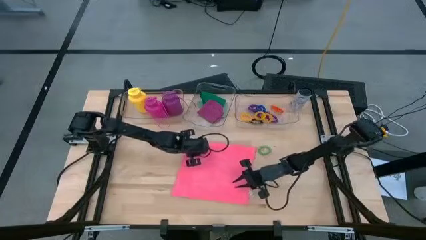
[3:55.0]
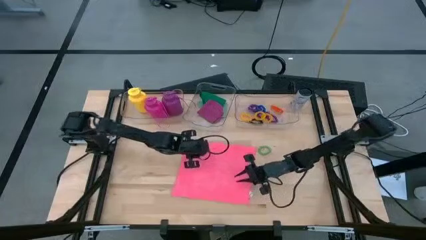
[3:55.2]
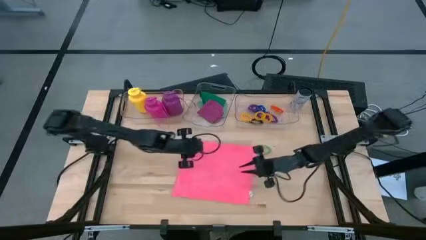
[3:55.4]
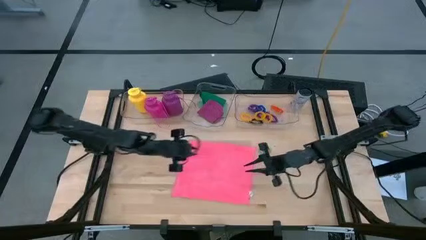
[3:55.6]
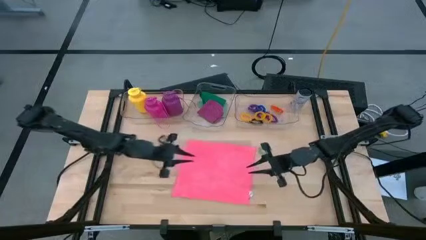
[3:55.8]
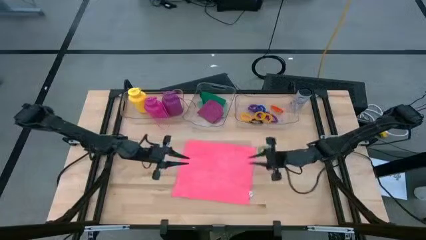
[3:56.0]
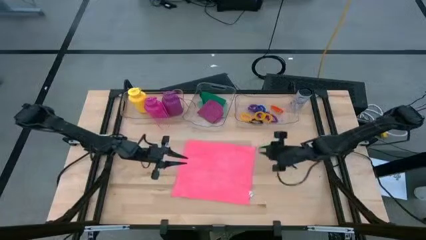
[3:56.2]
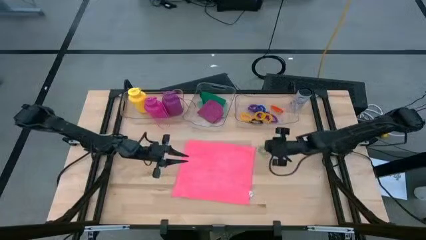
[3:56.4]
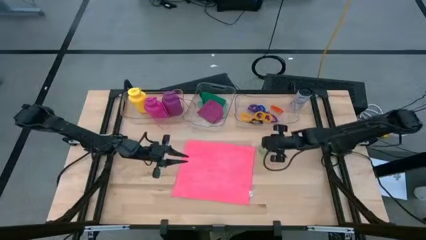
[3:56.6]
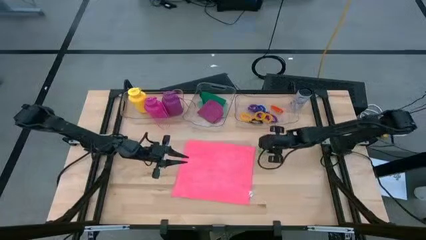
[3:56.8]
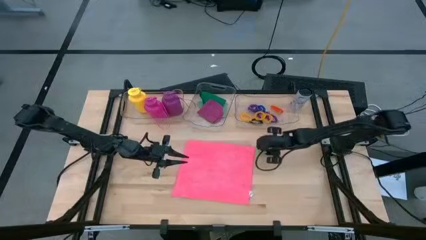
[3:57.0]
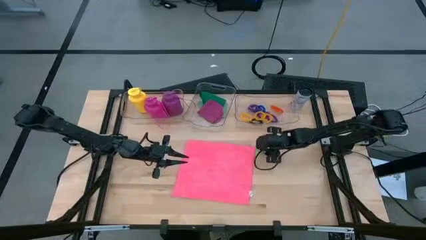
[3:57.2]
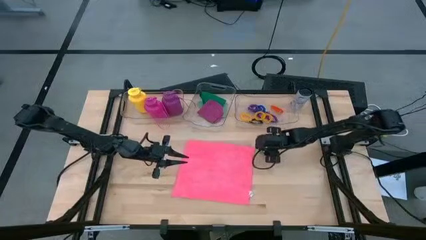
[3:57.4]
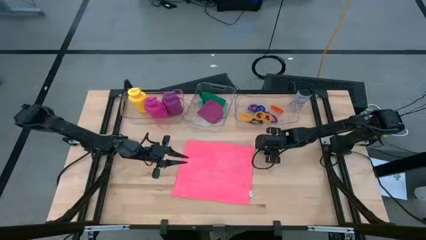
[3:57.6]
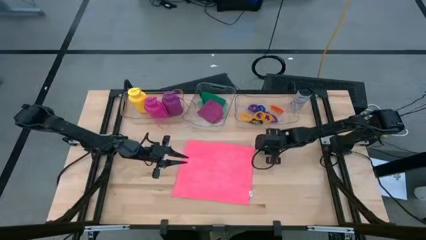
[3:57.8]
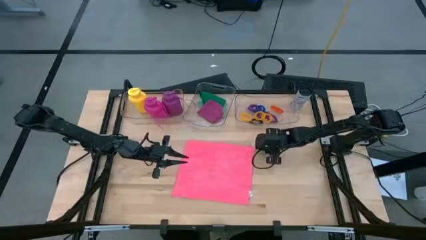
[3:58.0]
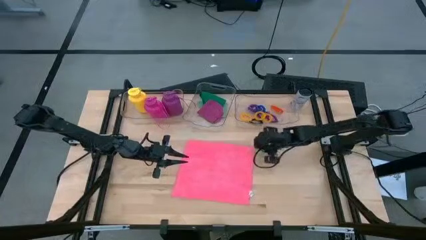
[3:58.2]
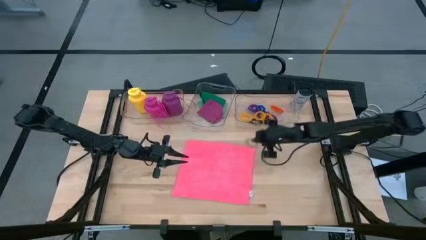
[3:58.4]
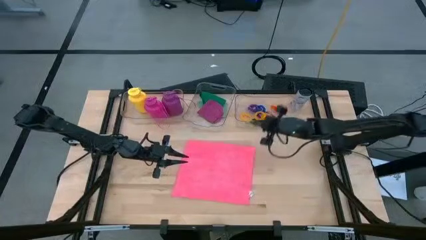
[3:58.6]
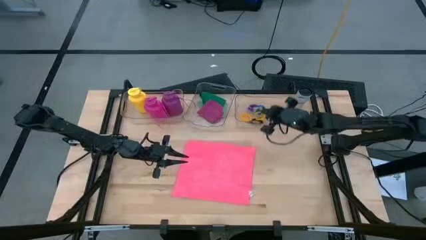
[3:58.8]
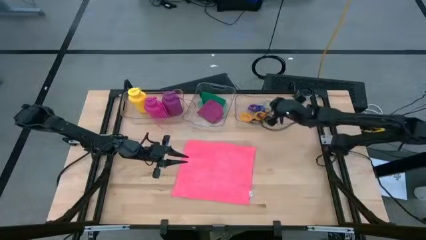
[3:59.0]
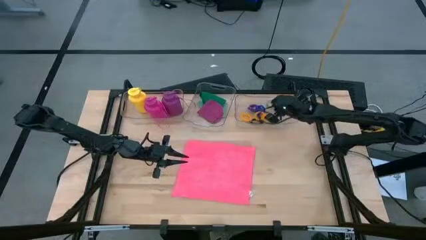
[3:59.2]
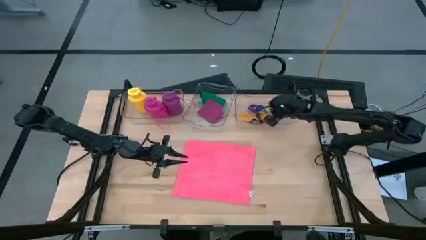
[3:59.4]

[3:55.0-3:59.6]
Task: Pick & Place Sports Items
Put the green spring keychain into the right transparent bin

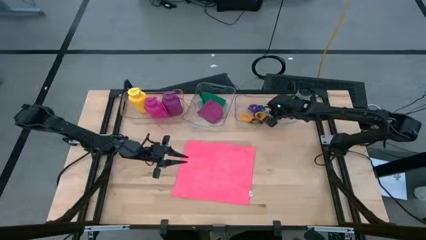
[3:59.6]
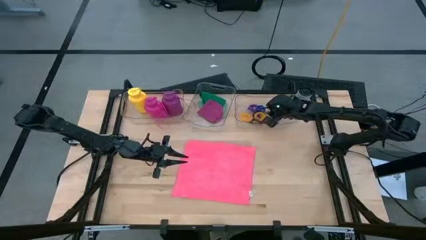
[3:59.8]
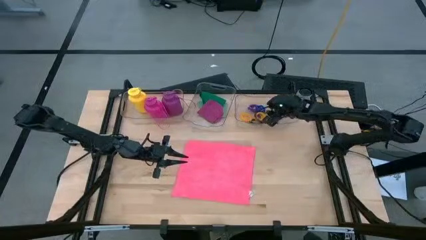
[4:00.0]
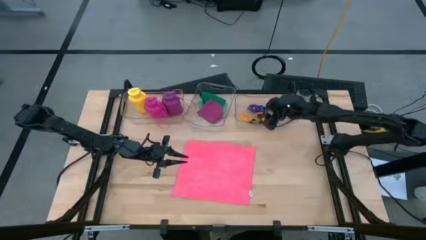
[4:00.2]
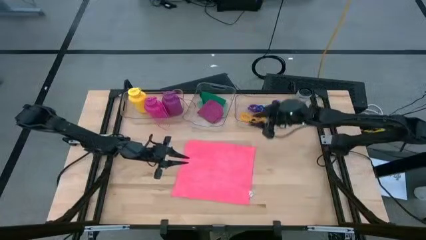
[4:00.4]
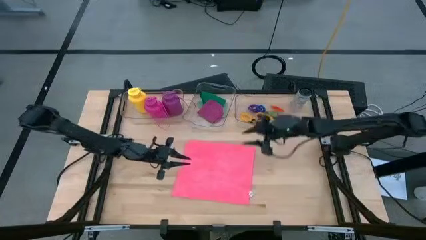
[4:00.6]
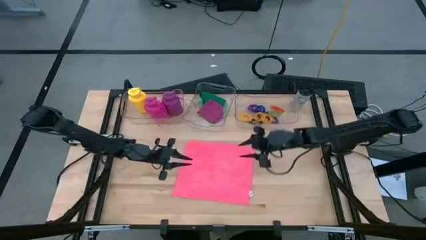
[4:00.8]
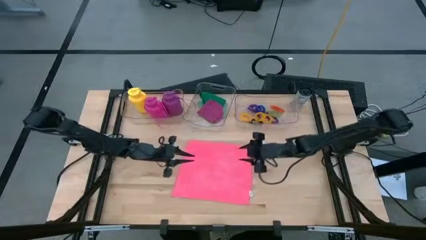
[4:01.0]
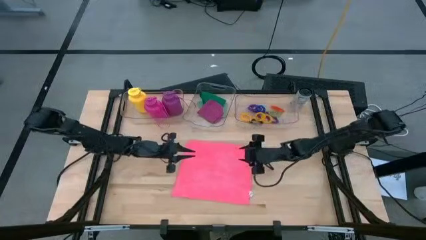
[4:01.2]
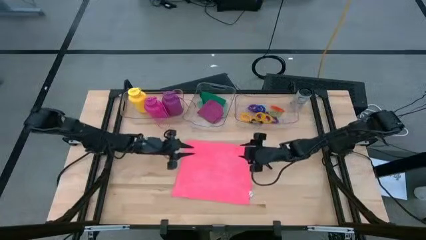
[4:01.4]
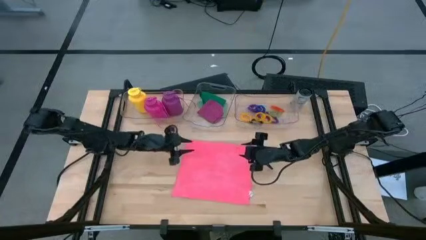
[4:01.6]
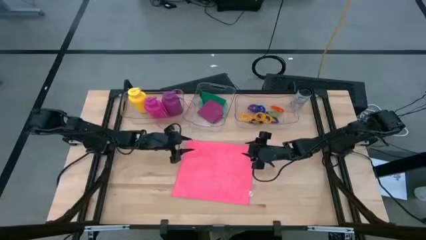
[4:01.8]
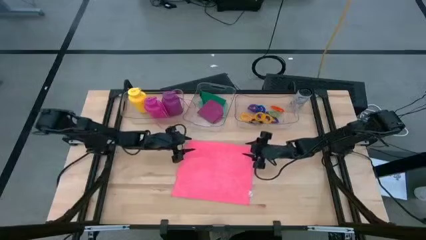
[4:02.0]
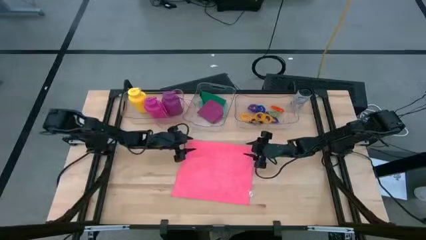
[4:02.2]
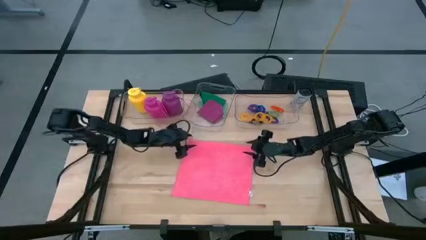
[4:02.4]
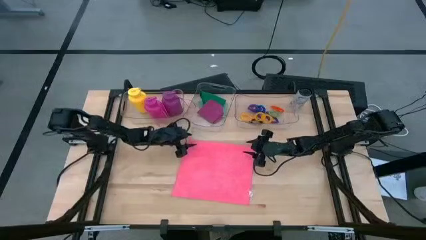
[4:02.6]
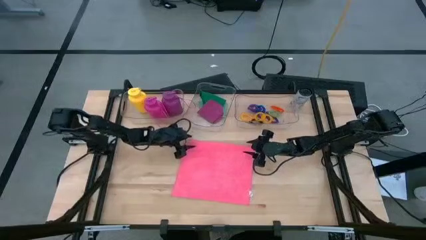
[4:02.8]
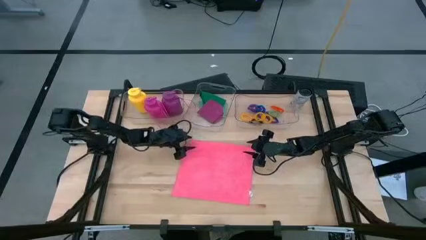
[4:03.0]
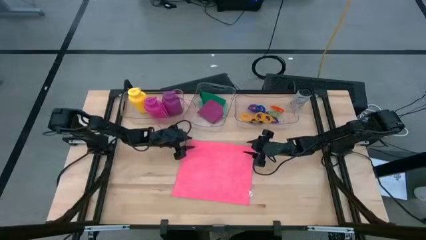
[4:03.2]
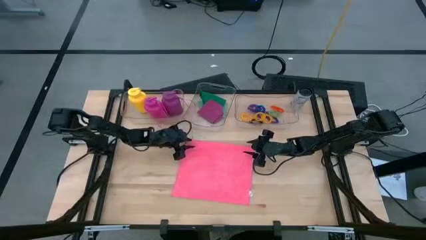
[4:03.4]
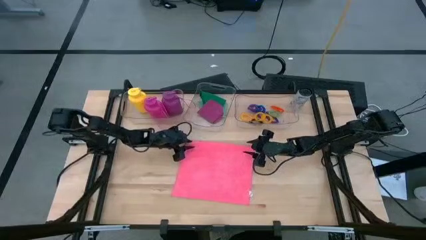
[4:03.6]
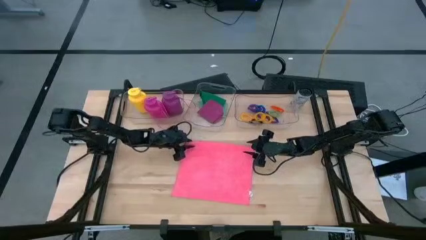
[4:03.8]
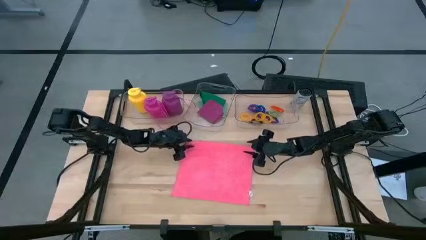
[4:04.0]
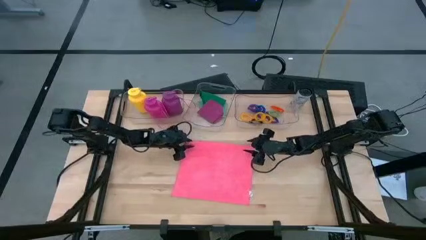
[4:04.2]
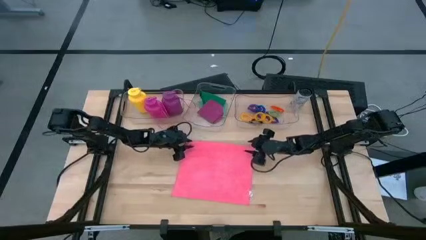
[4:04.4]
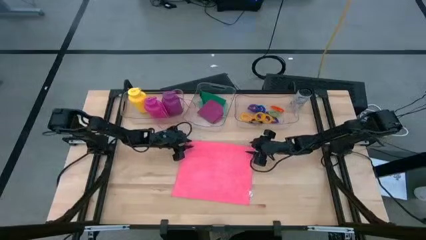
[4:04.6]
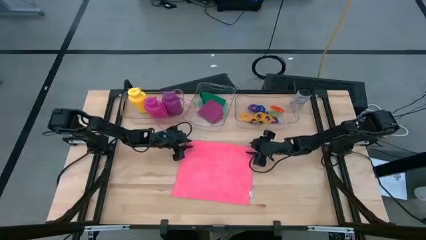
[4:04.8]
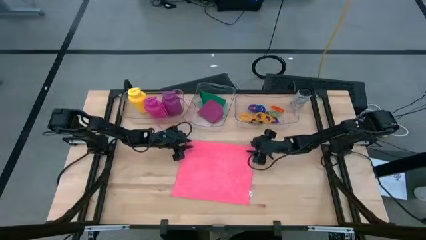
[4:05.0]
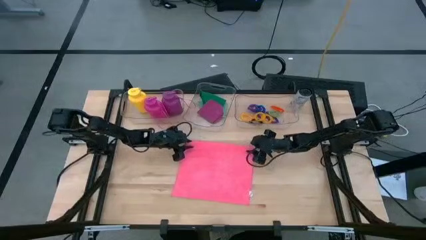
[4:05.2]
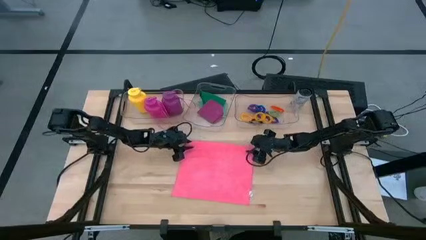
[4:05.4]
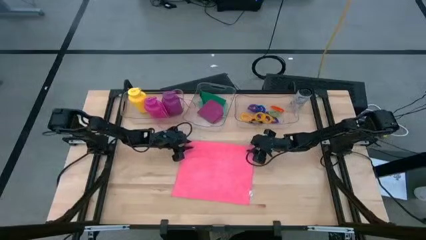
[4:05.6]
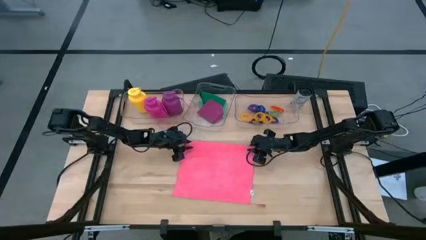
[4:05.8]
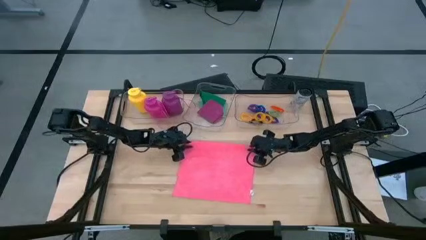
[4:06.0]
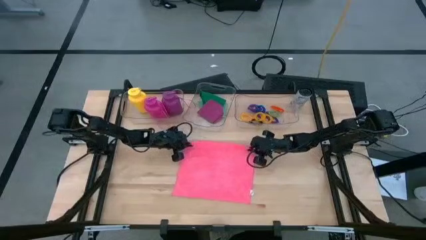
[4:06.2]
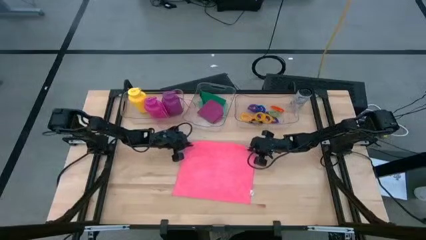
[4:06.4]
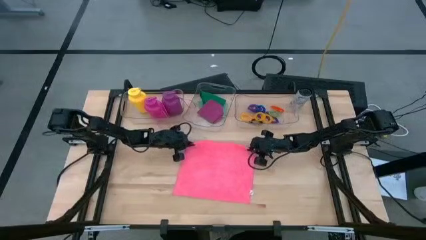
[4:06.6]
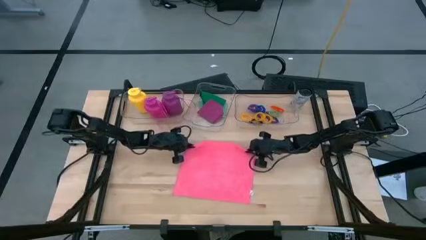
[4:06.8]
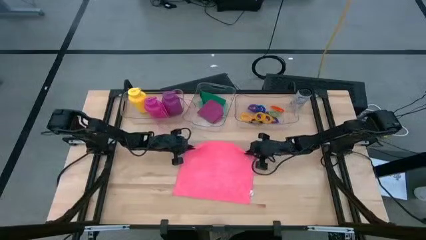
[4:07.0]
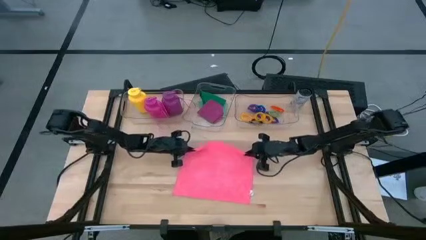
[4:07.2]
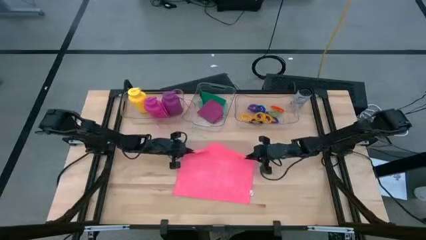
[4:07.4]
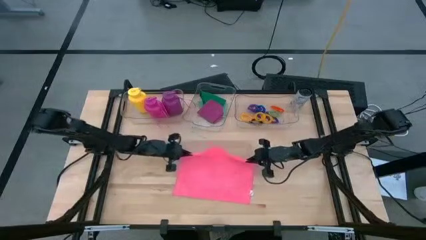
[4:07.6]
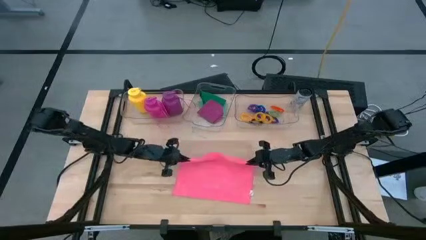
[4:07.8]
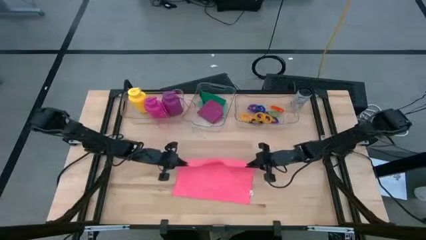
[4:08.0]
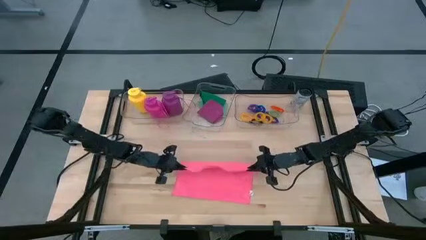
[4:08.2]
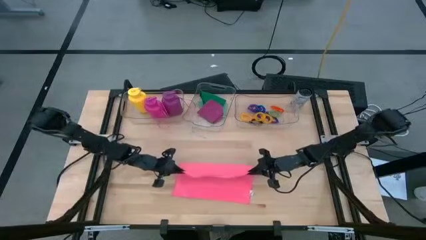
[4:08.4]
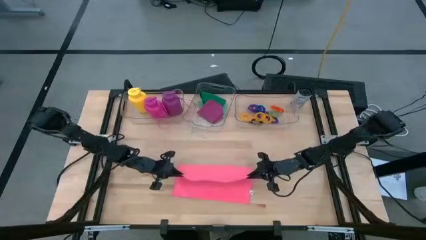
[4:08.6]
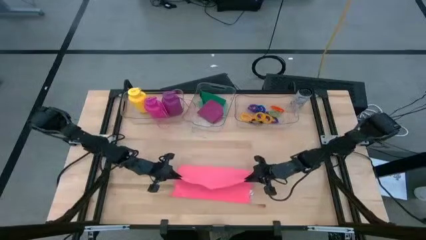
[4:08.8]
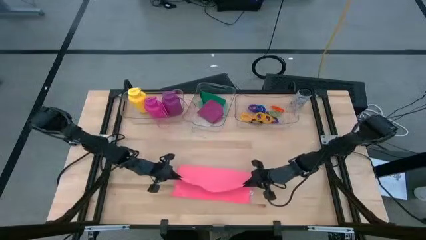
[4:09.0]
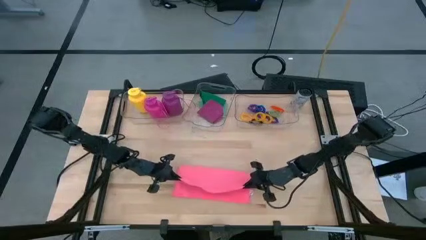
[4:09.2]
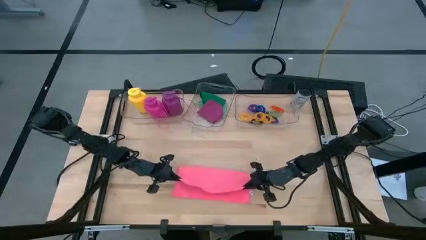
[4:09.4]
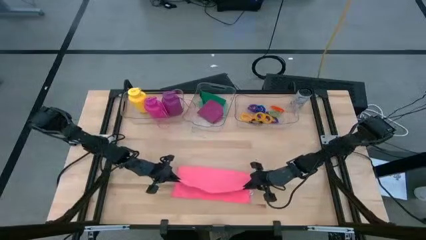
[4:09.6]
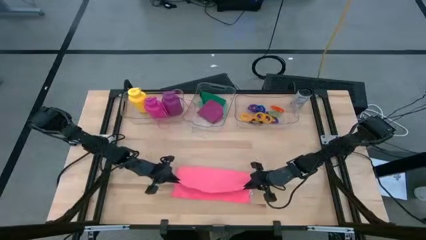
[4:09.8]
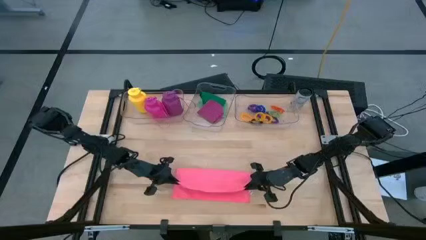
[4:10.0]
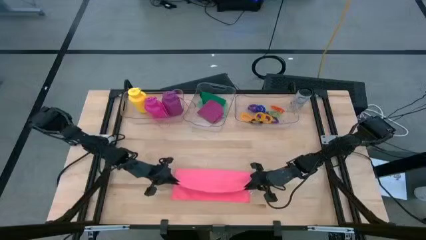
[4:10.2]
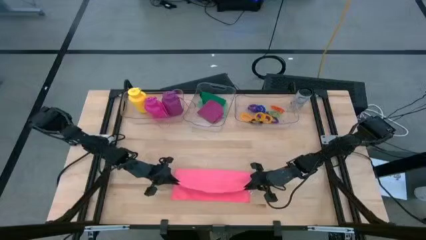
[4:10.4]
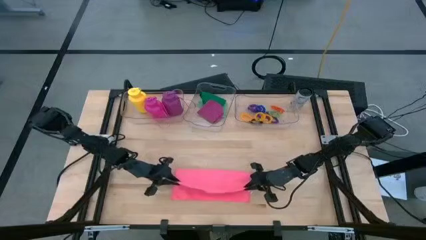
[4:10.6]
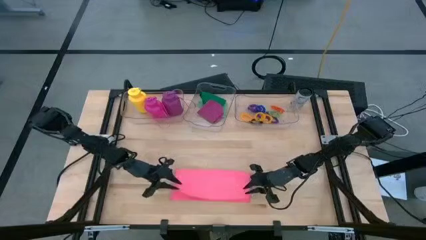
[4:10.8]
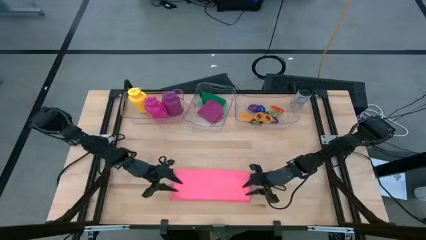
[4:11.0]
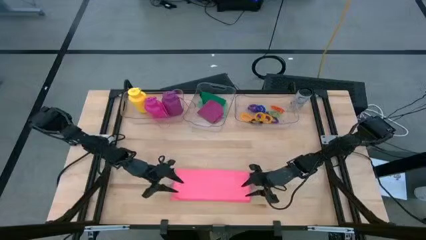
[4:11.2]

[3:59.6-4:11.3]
Fold the pink microfiber towel

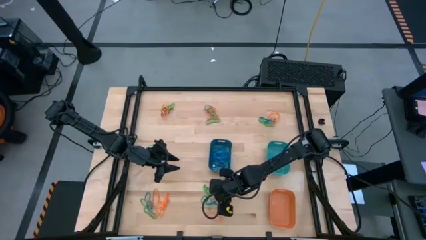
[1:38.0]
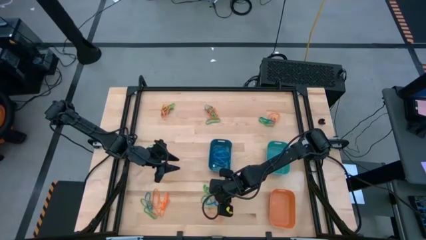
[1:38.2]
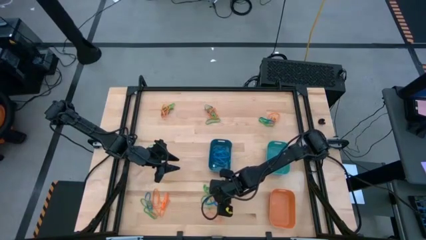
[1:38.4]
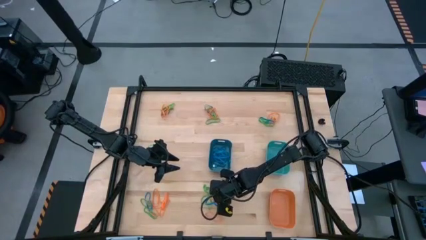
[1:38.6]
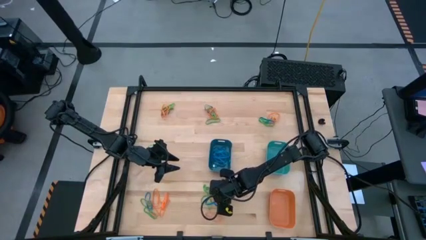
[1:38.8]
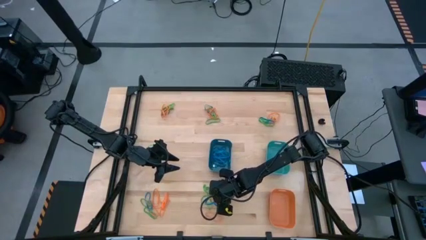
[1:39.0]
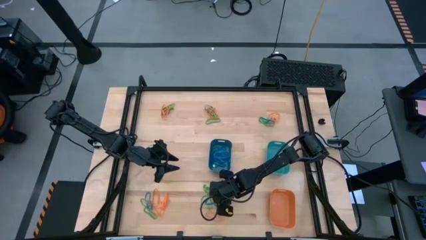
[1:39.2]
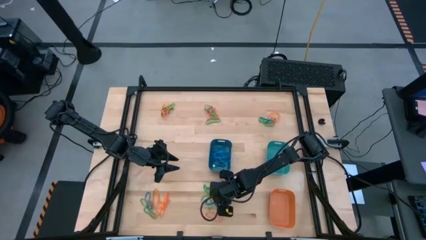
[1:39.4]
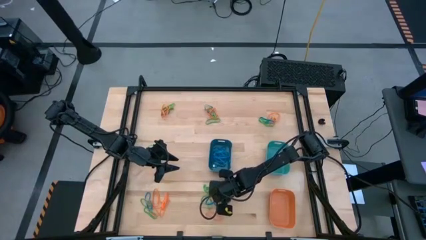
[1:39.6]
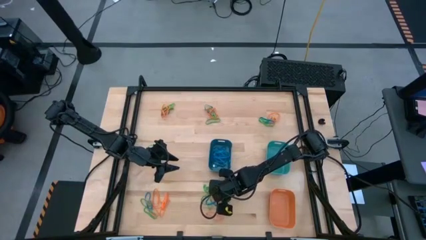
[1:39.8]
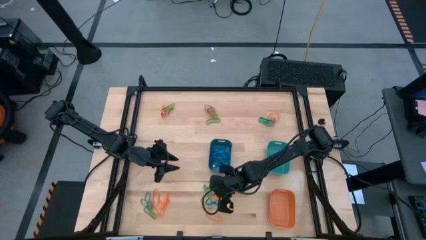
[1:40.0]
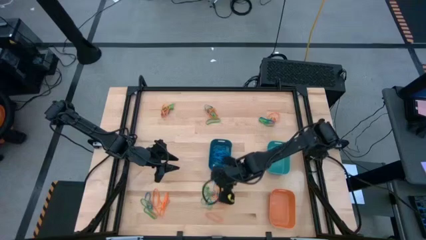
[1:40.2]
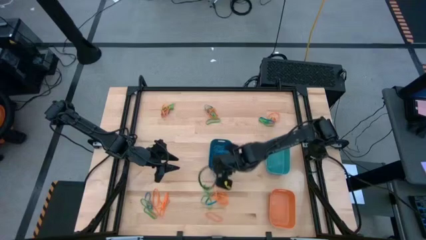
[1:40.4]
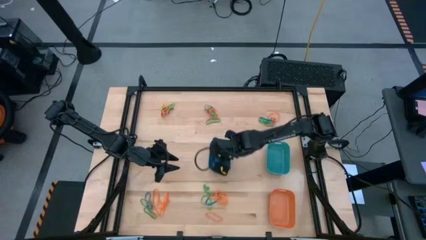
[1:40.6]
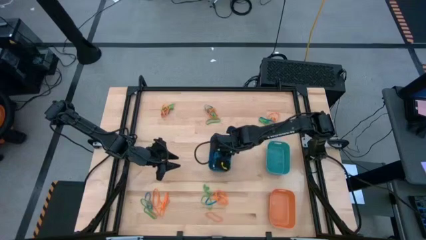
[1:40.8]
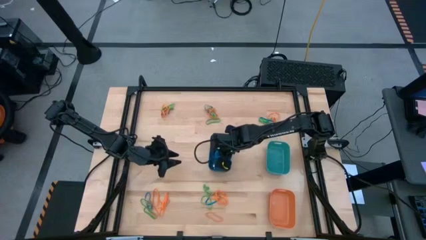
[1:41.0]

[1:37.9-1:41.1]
Task: Sort rubber bands into baskets
Put the blue rubberband into the blue bin
